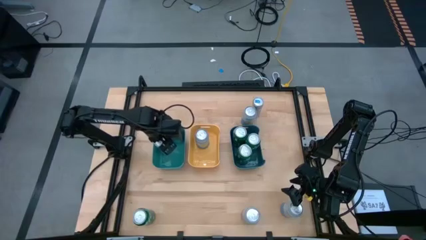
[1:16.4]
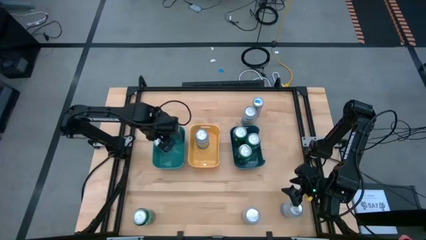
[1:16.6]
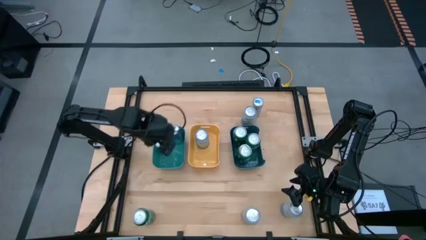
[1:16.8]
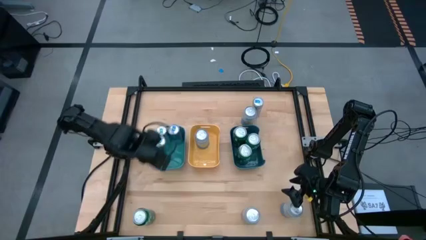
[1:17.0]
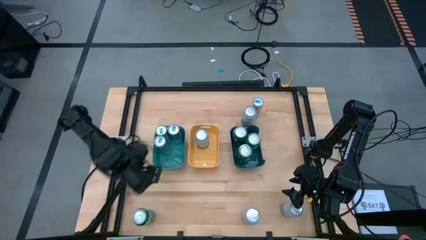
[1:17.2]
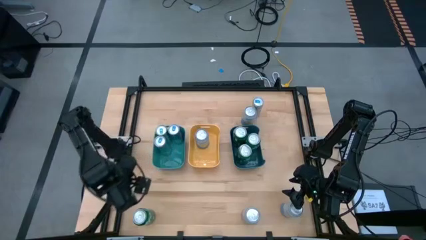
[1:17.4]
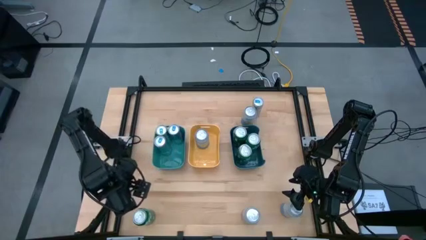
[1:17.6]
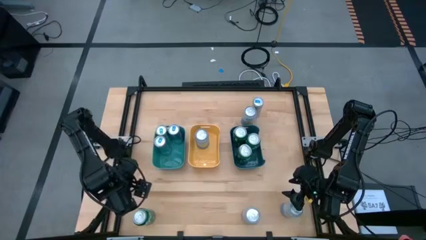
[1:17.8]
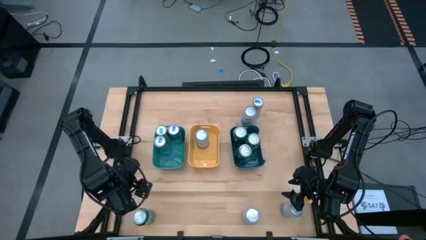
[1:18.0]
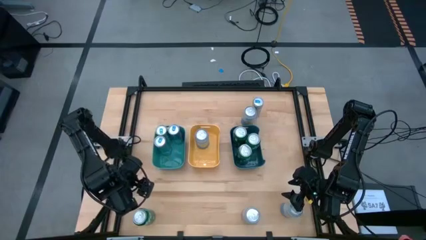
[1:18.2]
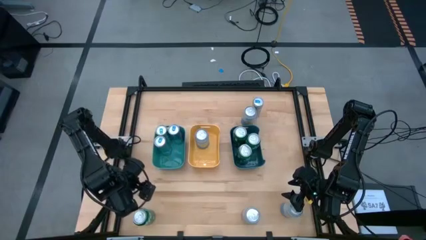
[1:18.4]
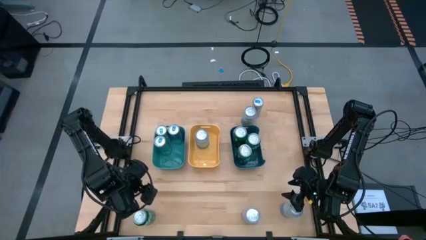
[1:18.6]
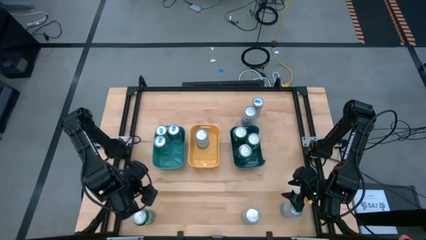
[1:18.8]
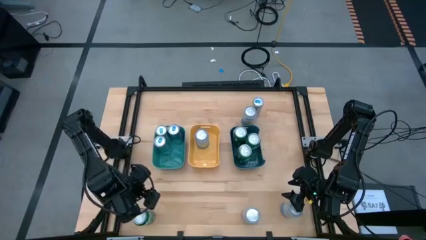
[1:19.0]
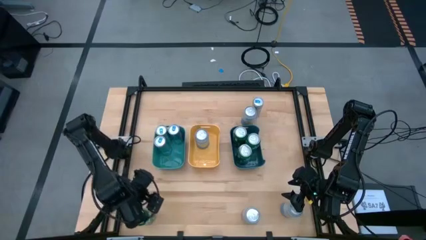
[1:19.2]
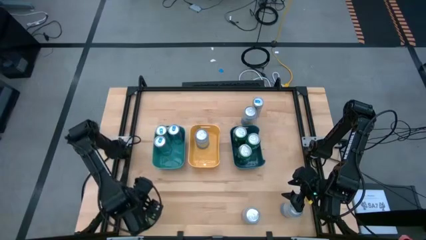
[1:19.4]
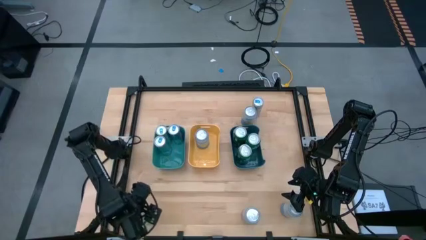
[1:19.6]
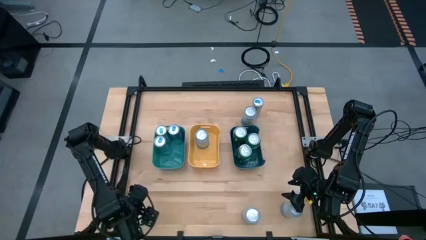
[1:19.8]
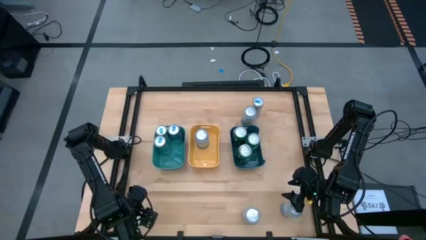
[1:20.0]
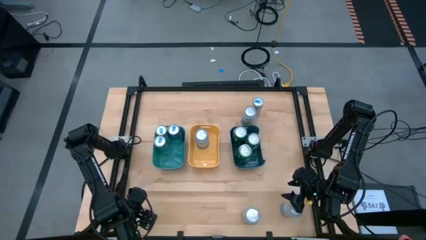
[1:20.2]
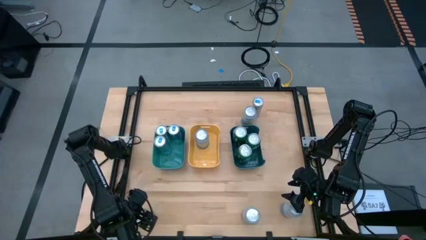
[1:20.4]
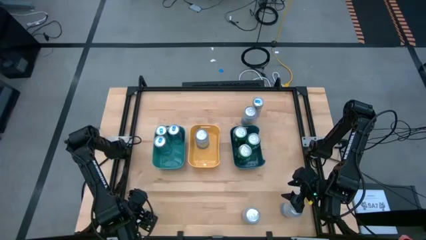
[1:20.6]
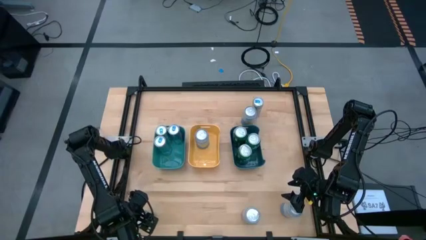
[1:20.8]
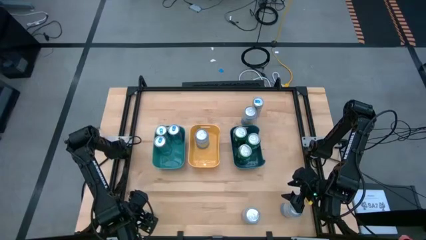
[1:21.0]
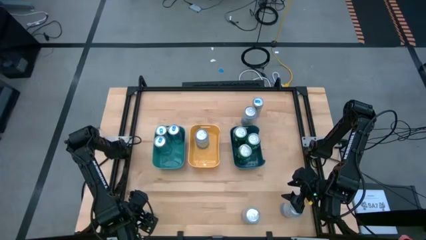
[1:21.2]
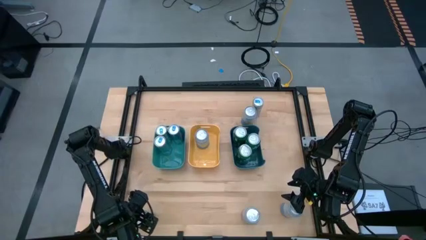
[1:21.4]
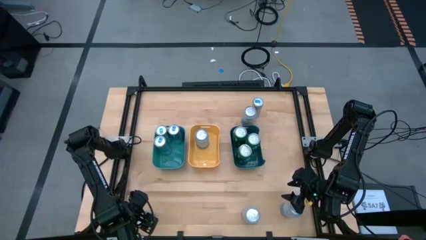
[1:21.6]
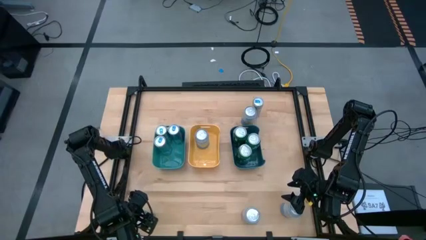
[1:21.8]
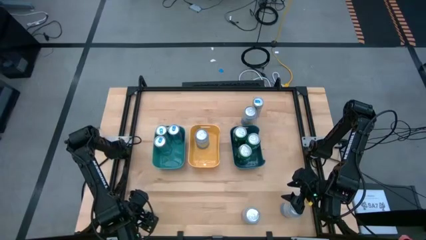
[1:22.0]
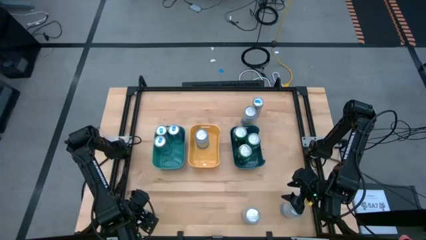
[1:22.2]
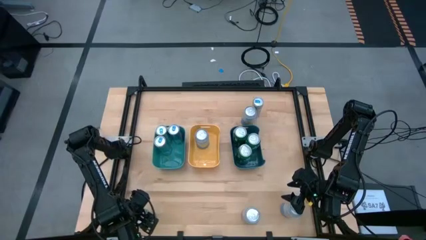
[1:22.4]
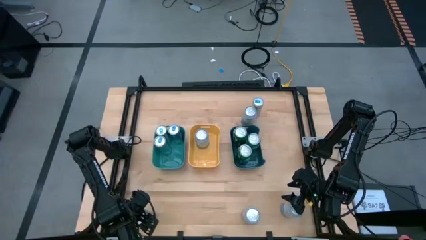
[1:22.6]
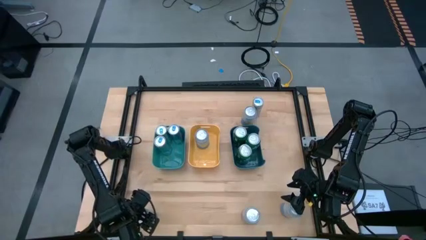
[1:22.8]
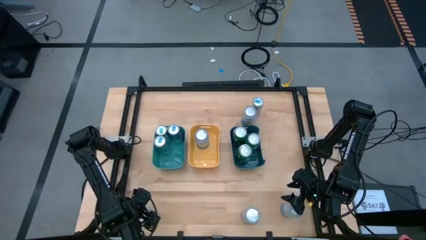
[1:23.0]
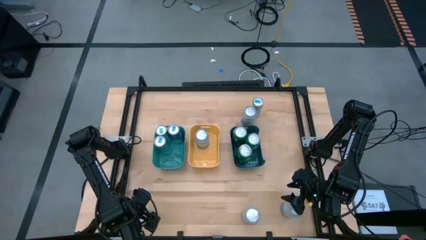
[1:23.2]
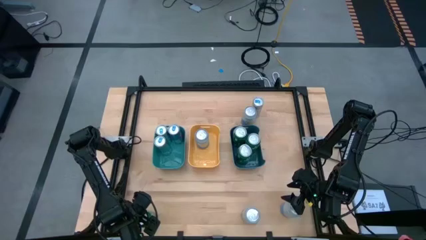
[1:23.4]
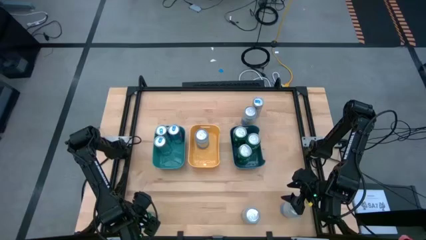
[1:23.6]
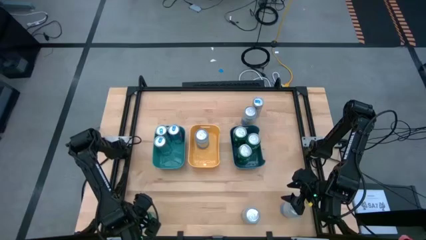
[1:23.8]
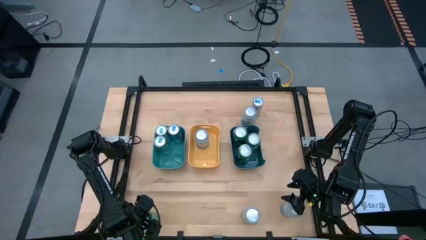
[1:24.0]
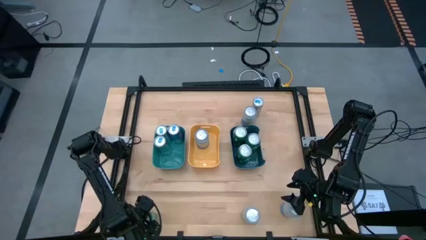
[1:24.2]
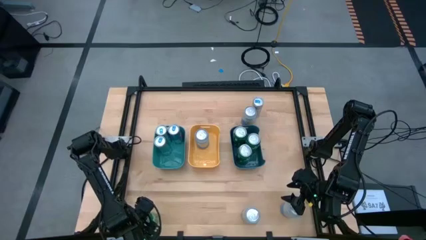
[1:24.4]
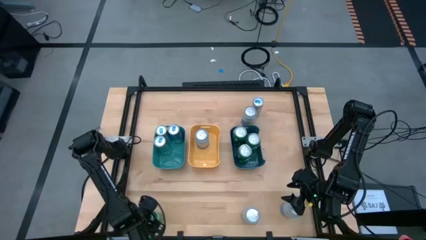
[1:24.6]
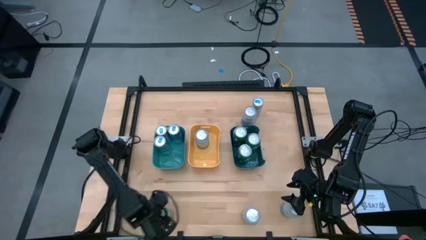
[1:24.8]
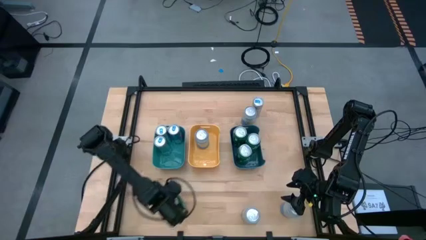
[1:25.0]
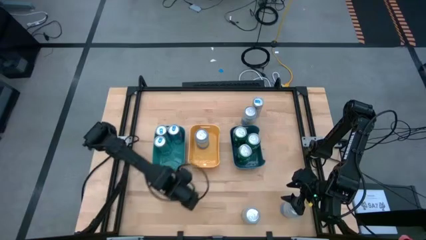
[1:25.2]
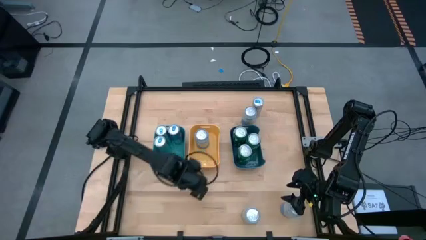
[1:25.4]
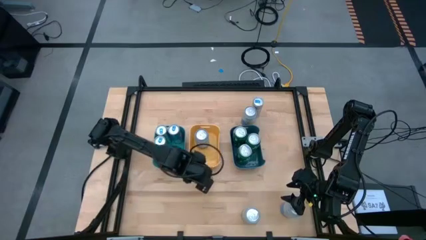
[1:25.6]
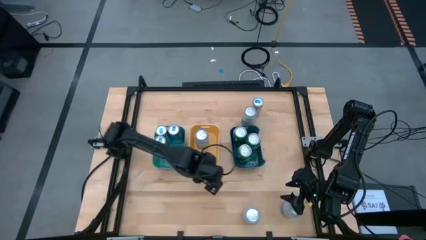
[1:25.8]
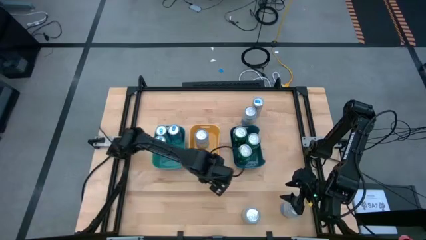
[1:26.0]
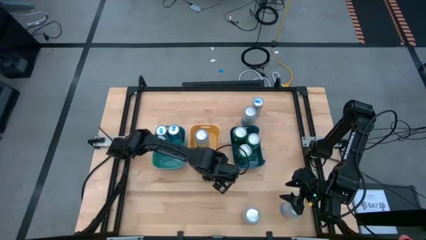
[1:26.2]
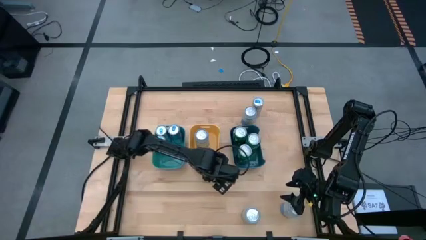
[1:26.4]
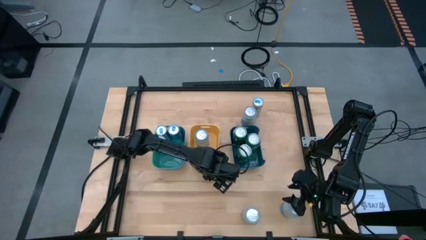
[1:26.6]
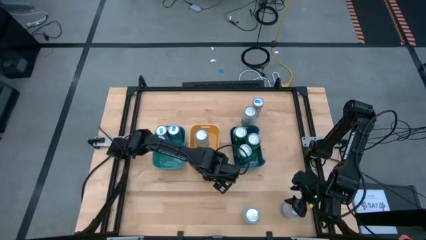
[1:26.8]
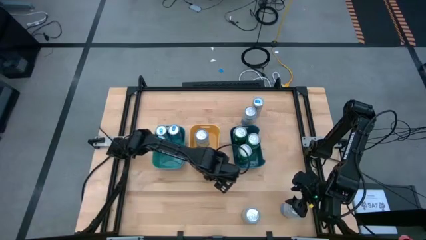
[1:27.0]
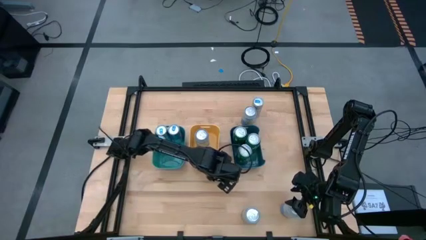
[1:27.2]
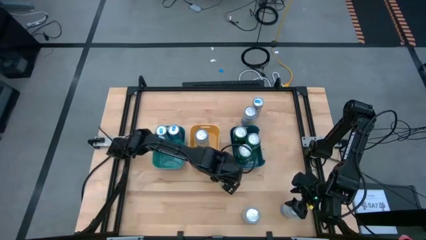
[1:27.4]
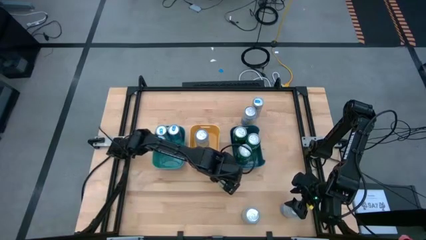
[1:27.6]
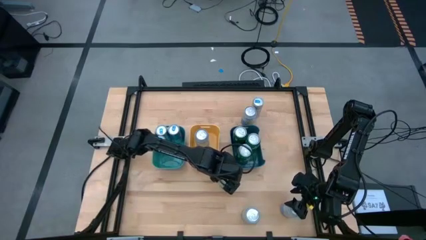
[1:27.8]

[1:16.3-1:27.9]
Task: Sort soda cans
Move the green soda can to the bottom center of the table

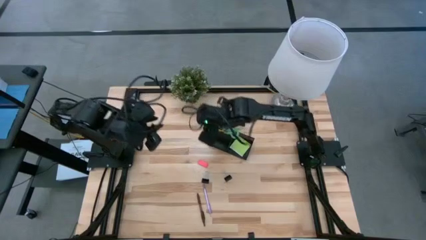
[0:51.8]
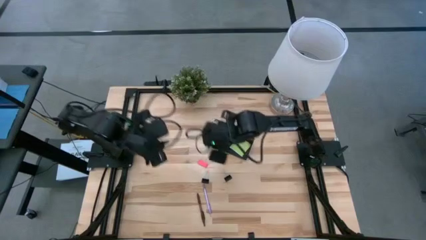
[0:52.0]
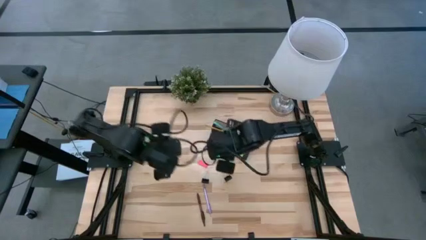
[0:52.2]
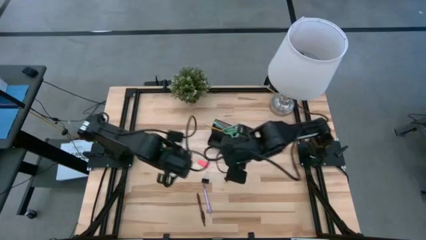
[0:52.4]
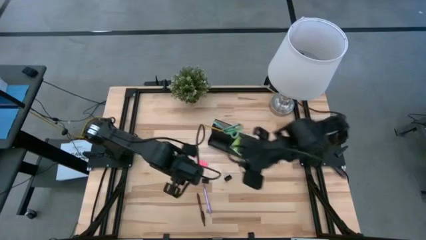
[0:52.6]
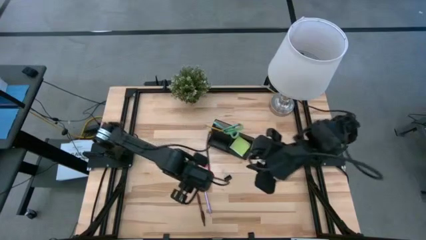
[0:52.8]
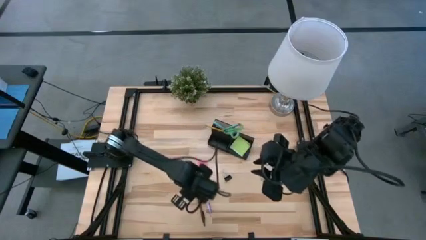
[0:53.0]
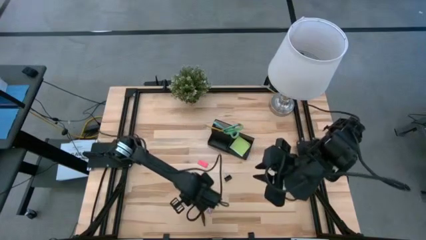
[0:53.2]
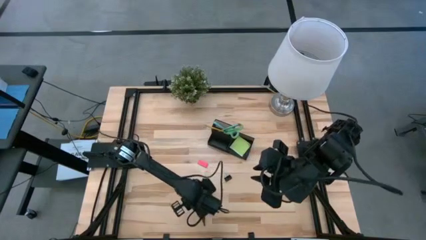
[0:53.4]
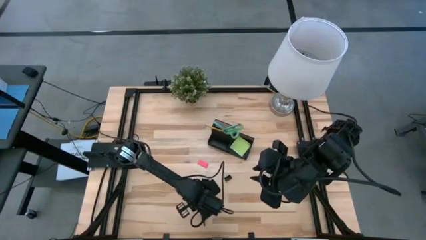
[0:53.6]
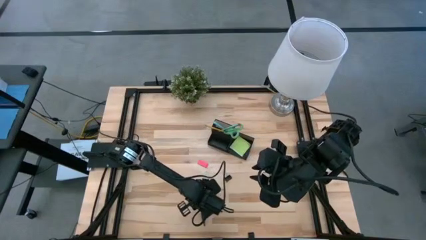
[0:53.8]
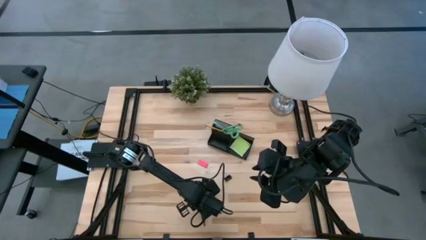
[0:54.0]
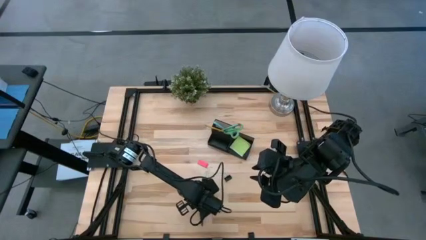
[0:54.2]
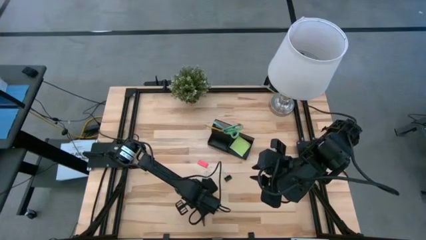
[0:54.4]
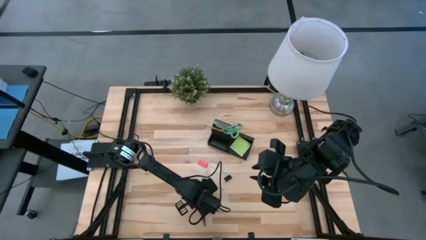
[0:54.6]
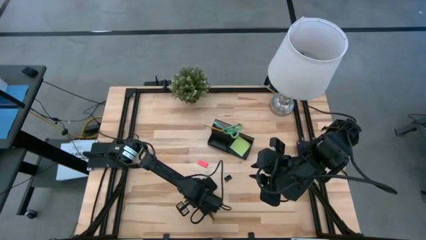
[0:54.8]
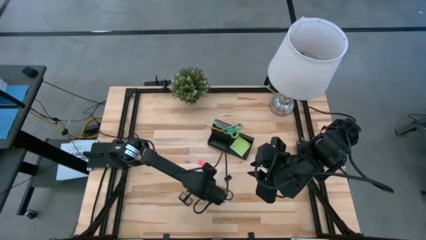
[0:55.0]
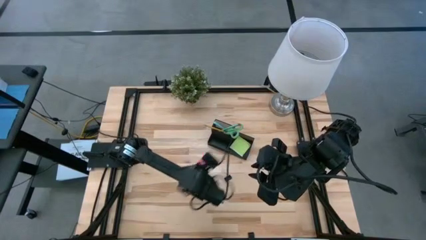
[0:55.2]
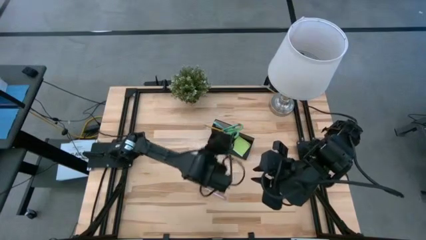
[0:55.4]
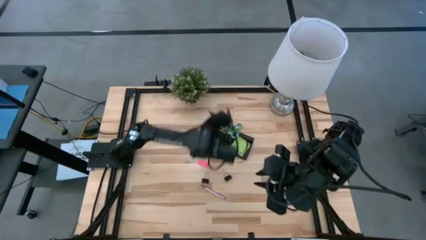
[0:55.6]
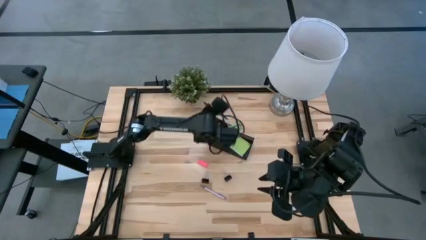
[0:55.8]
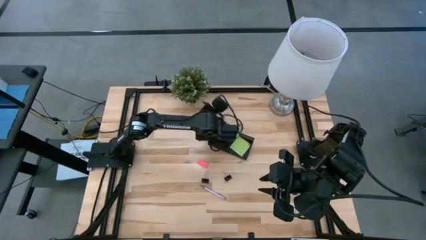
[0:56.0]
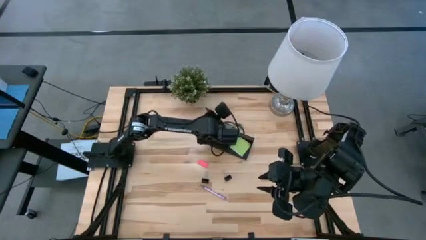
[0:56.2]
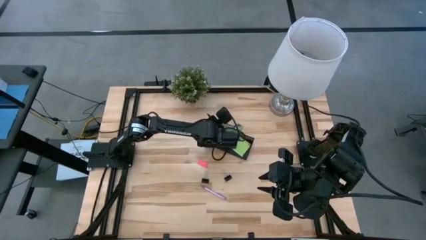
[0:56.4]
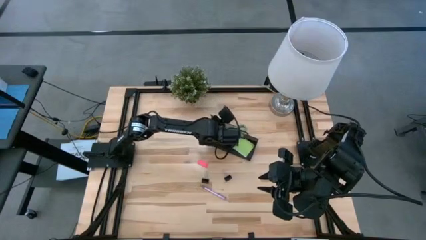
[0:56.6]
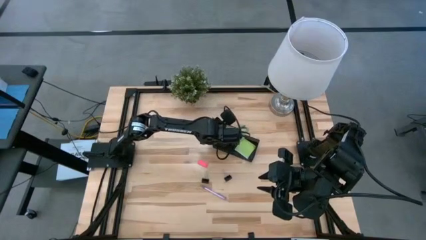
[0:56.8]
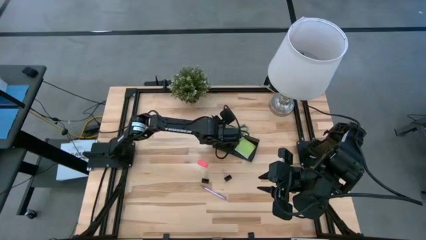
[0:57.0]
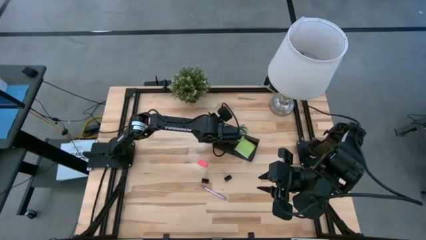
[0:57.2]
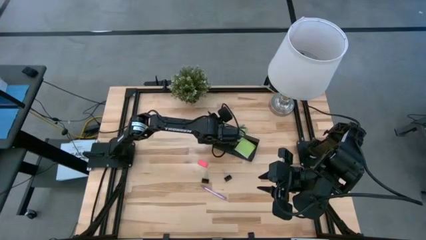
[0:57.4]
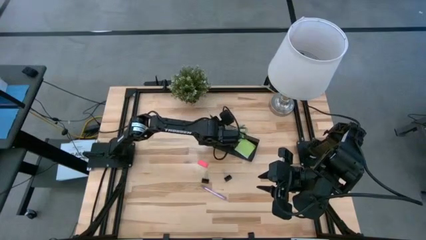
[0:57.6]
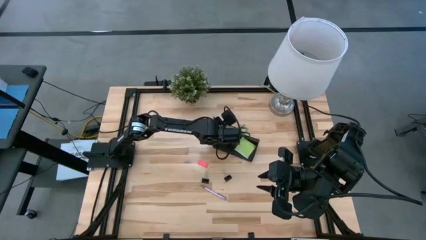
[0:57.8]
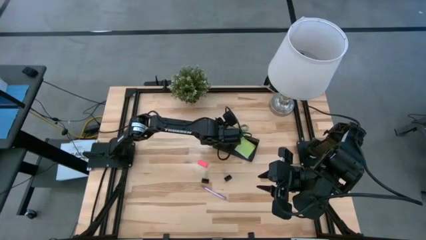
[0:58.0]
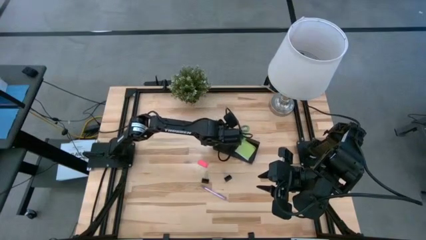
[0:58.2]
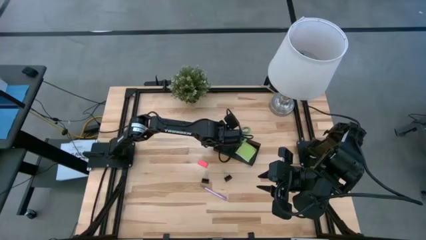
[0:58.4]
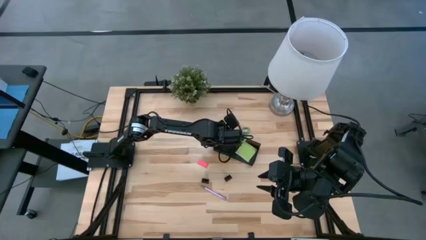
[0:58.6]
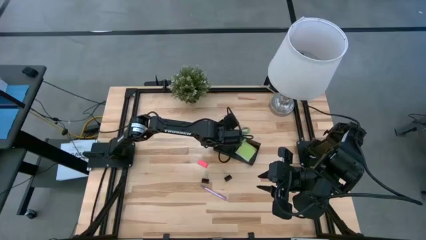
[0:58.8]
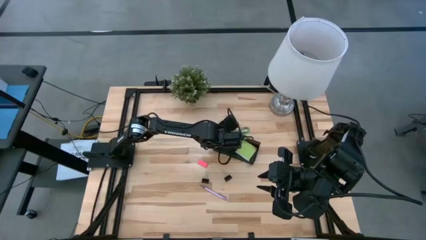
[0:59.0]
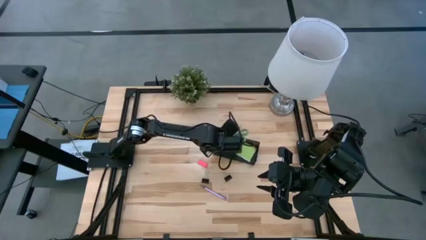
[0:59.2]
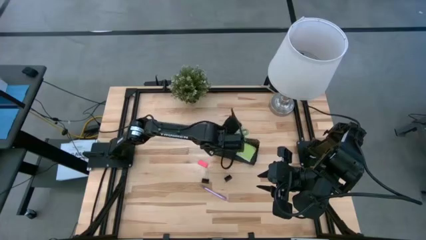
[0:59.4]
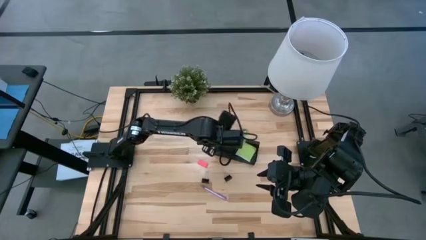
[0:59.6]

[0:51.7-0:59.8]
Task: Pick and place office supplies into organizer
Put the brown ballpen on the black desk organizer
